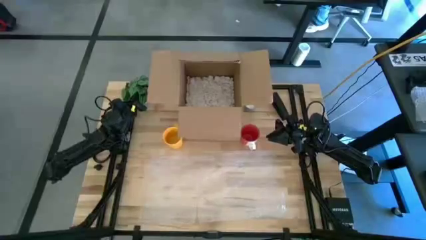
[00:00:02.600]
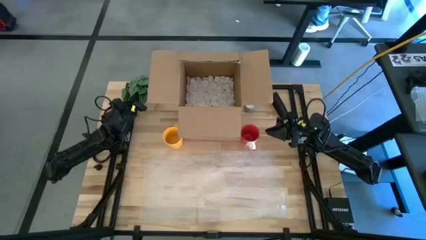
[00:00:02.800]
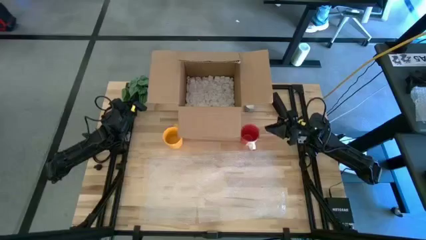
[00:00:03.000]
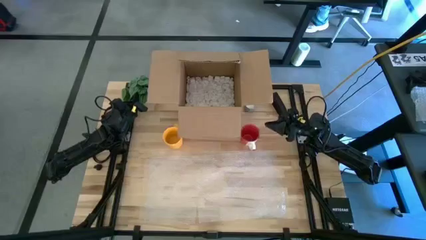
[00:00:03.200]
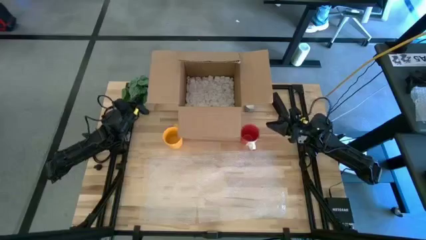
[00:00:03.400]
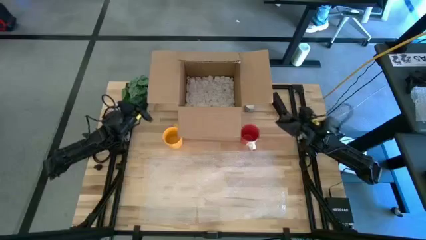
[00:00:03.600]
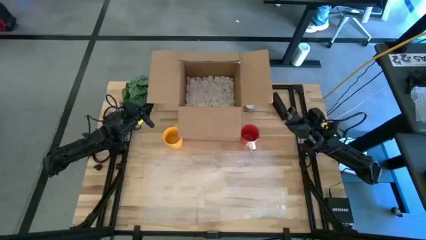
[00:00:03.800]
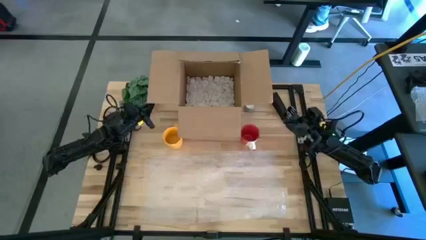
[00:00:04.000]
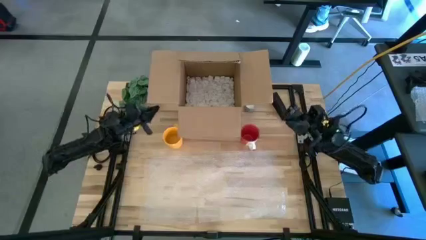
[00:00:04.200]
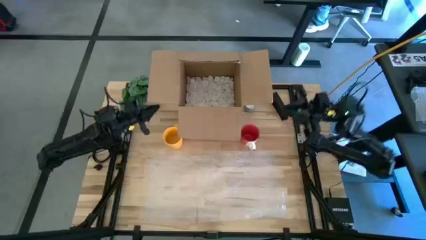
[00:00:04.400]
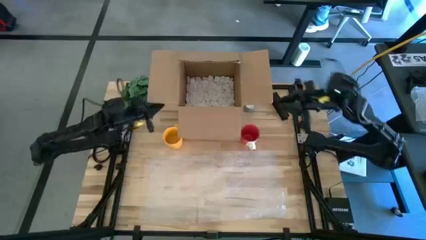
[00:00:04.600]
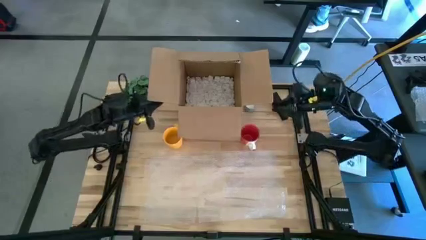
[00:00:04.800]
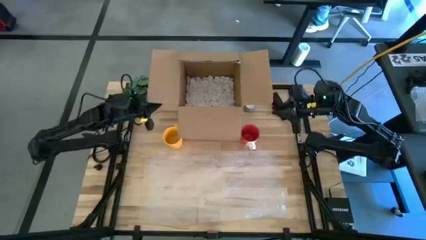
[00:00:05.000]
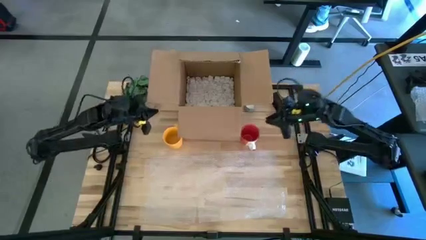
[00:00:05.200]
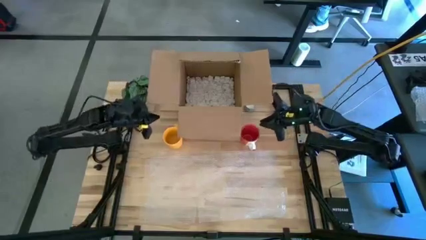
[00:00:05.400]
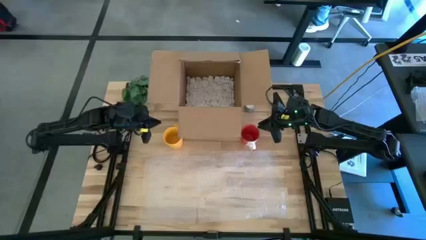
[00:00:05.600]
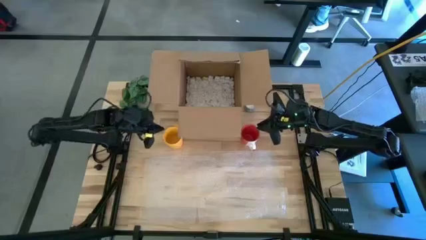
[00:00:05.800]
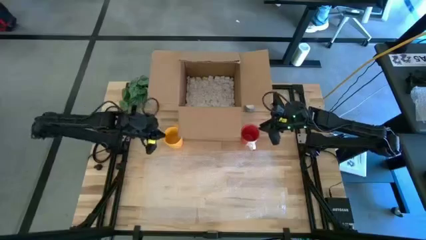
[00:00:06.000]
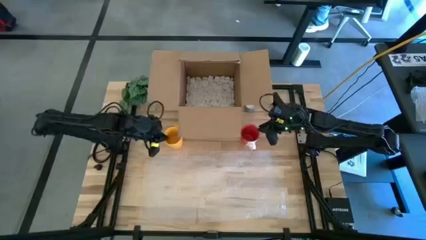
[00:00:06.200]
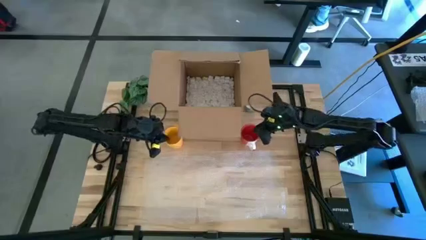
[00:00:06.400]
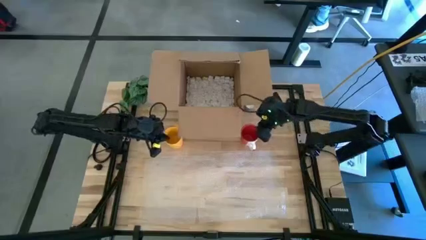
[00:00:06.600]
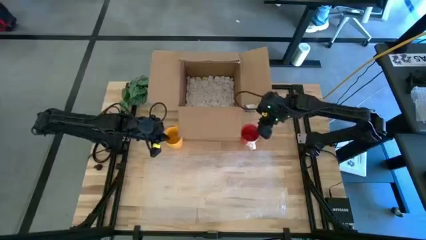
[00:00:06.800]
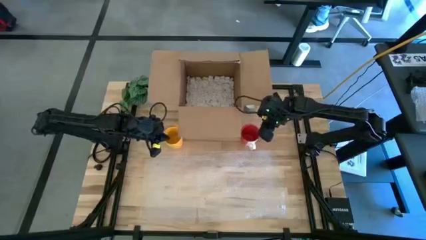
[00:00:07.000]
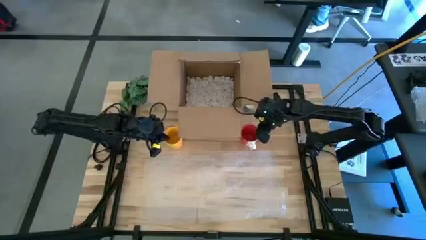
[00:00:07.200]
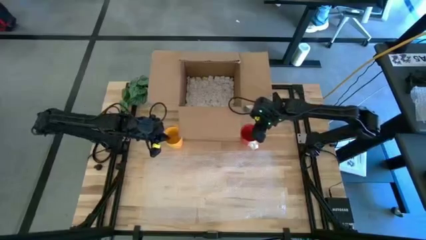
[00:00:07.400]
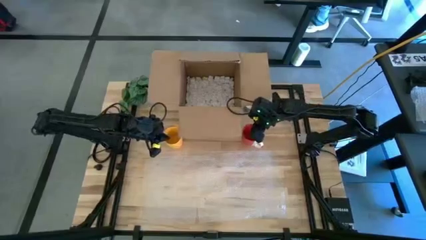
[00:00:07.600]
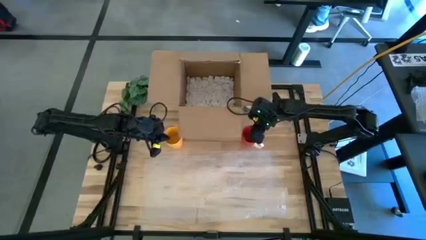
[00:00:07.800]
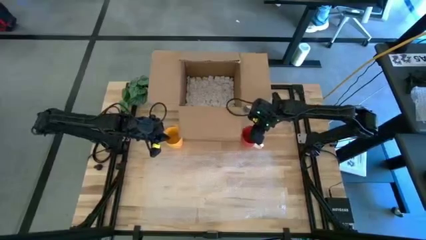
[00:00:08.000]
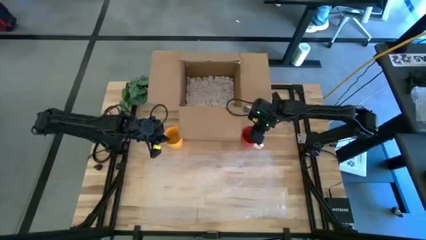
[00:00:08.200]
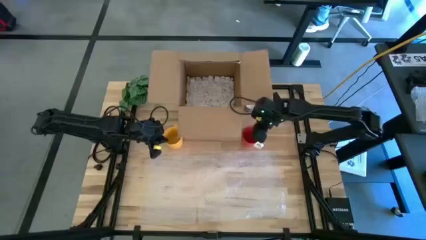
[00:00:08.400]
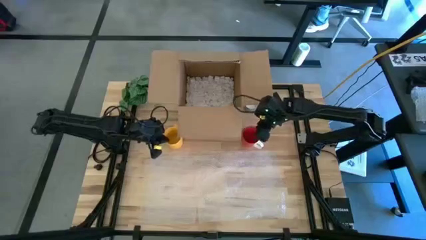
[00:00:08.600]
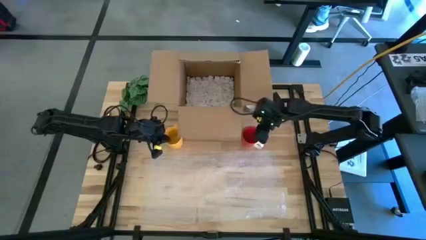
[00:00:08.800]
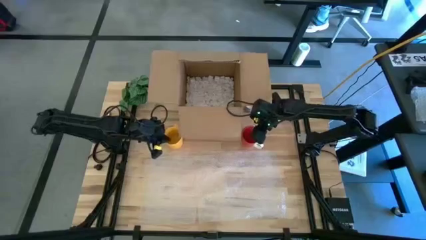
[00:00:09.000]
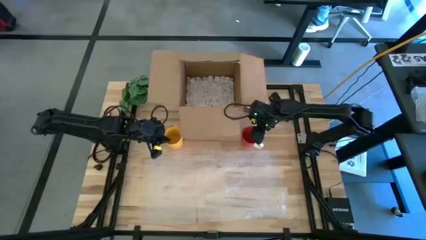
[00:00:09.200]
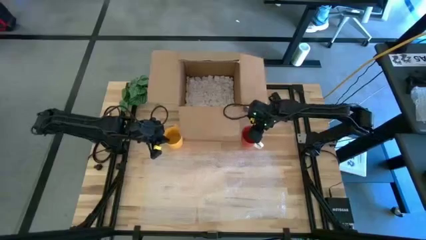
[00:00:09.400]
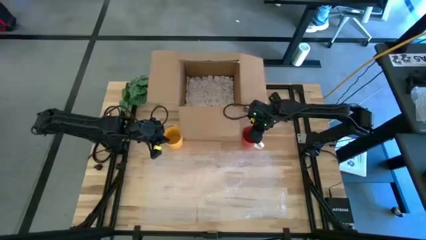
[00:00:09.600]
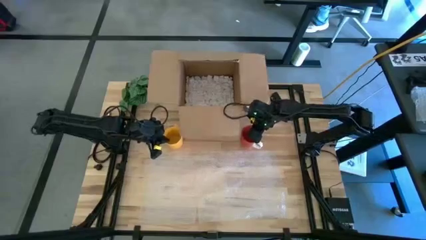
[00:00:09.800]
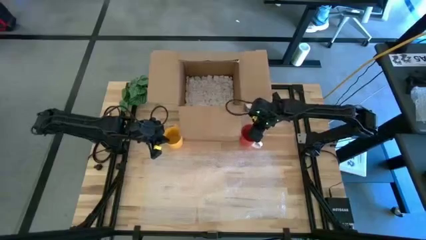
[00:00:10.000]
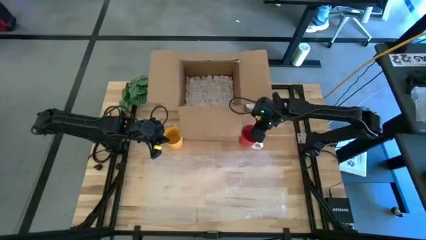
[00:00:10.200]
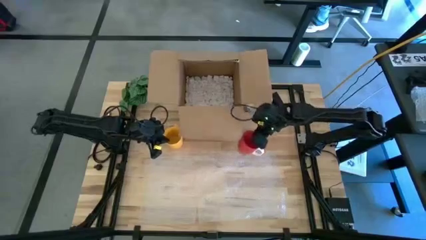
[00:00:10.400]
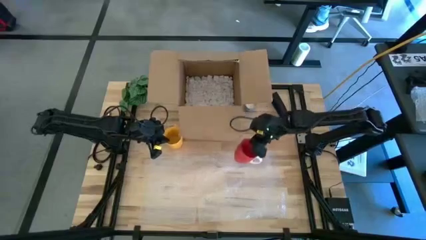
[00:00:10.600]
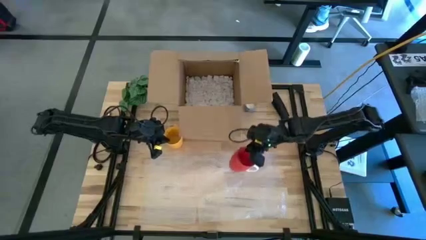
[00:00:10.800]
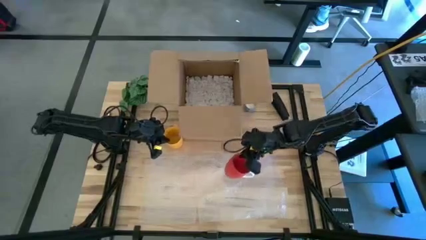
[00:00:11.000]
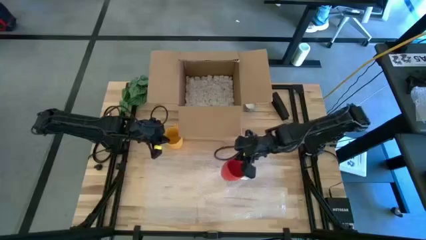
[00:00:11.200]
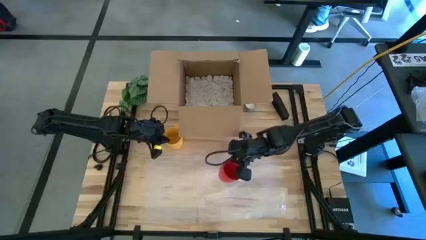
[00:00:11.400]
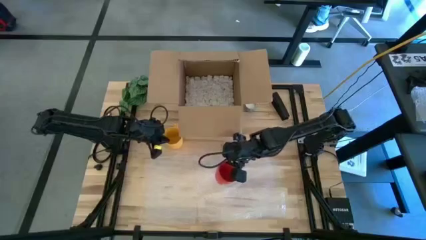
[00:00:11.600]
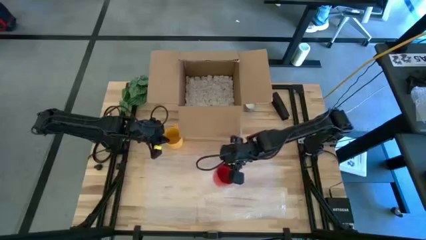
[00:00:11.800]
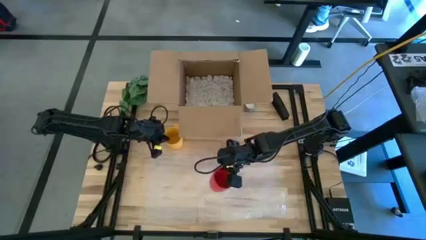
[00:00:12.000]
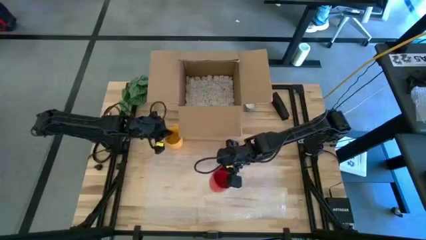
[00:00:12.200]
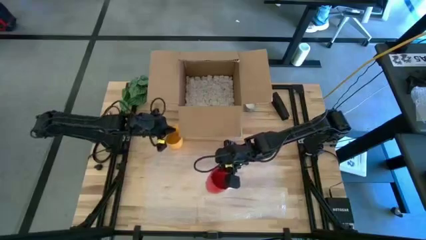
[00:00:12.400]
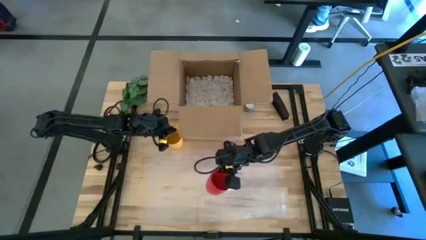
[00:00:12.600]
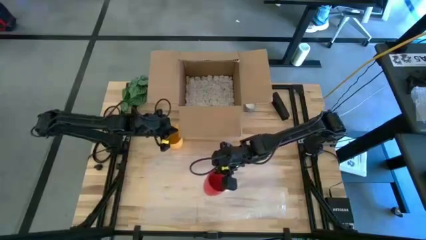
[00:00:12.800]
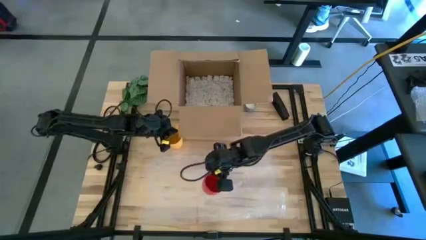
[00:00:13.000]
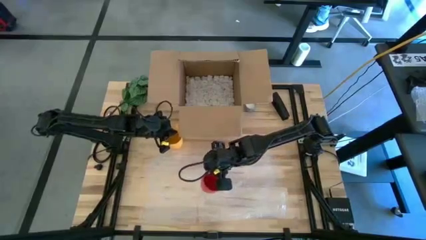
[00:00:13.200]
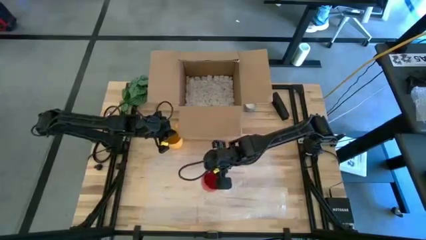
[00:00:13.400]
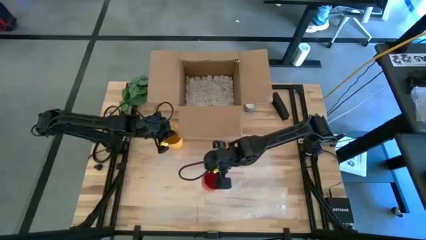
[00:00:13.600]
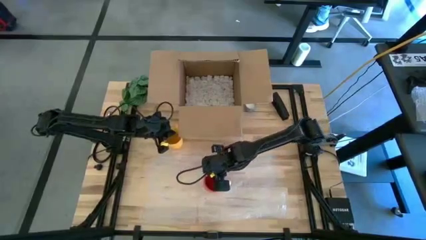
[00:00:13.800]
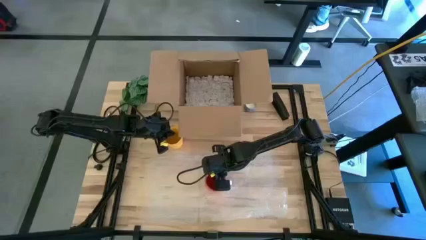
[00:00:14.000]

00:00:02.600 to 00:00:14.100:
Task: wrap mug
Put the red mug on the bubble wrap

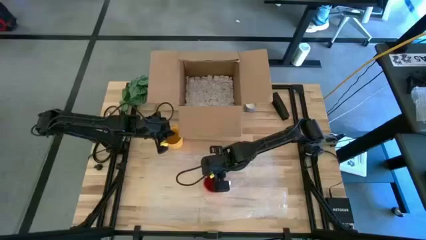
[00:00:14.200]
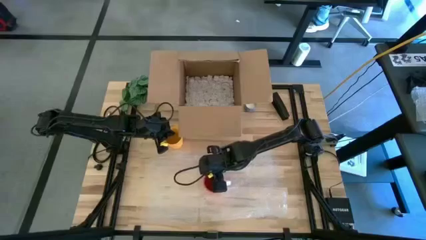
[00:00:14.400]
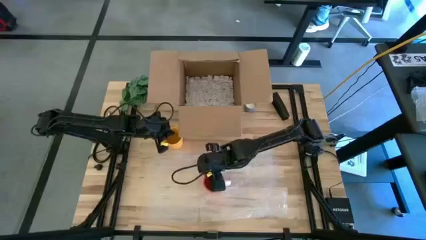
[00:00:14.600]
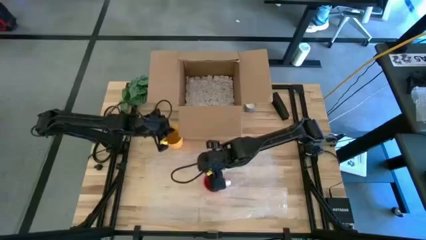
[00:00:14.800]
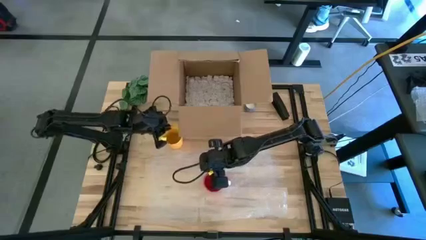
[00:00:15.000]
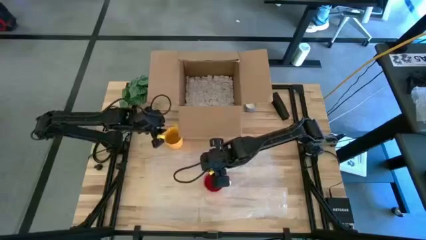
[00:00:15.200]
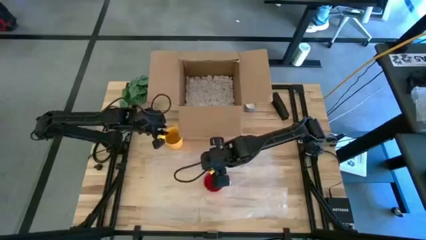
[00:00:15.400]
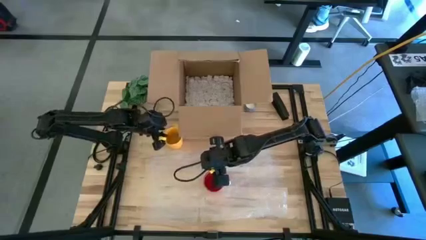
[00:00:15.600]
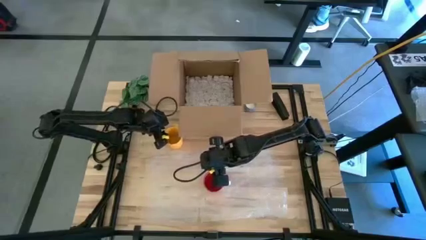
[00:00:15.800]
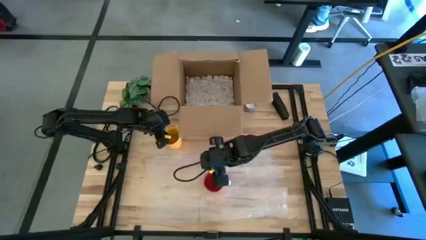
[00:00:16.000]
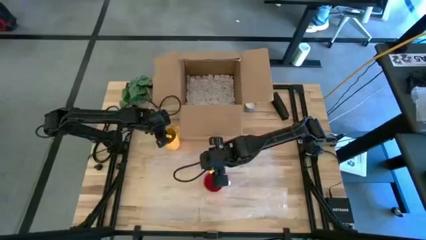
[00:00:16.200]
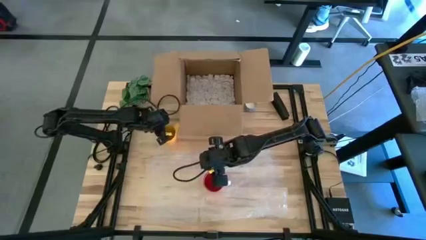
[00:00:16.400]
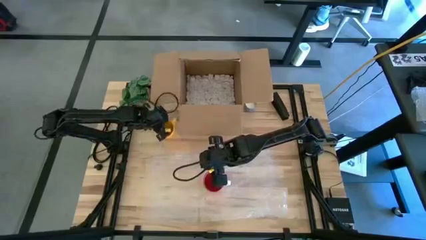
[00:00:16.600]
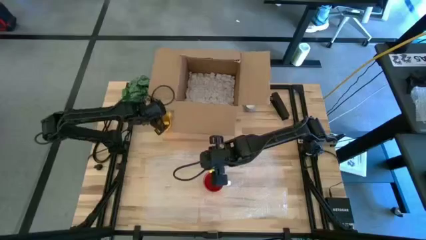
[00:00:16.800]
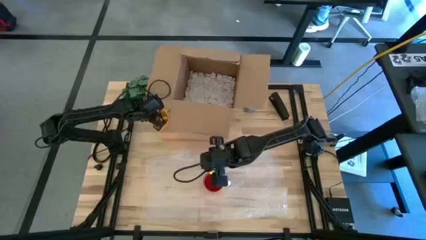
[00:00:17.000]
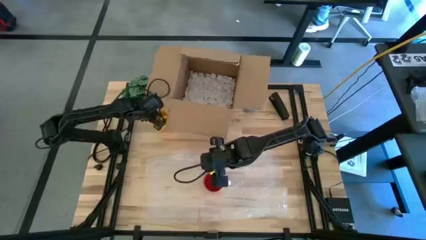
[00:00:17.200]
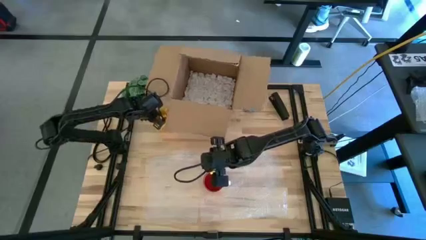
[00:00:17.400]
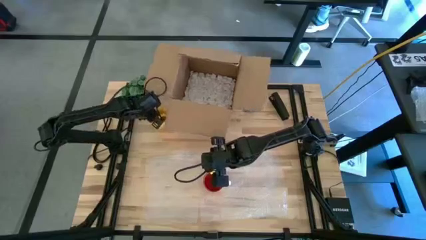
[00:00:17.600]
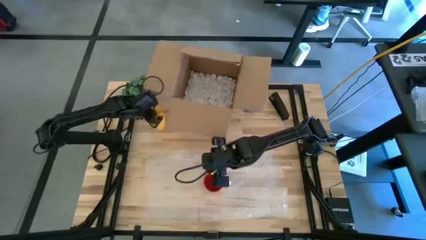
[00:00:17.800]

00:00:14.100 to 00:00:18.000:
Adjust the yellow mug slightly to left
